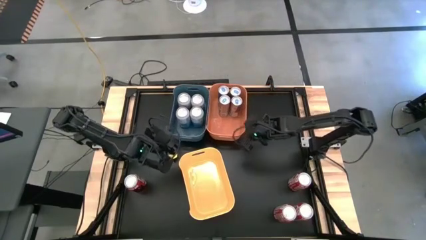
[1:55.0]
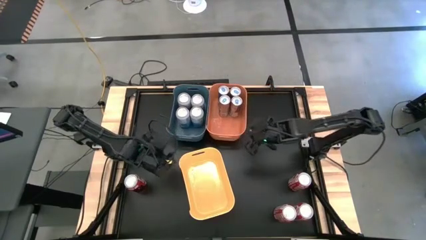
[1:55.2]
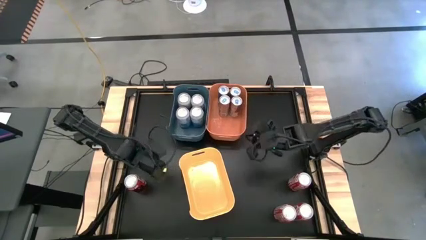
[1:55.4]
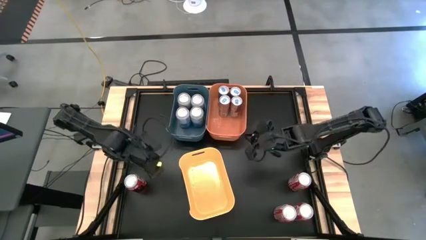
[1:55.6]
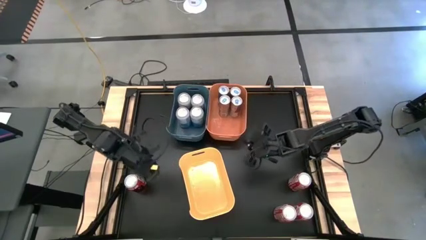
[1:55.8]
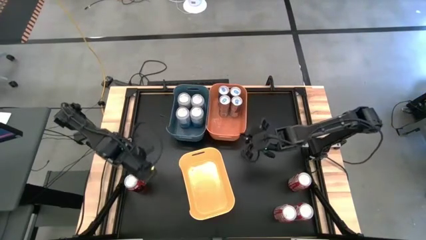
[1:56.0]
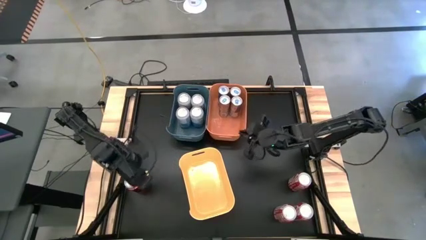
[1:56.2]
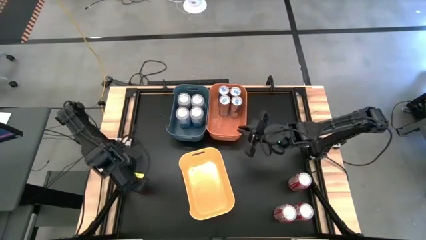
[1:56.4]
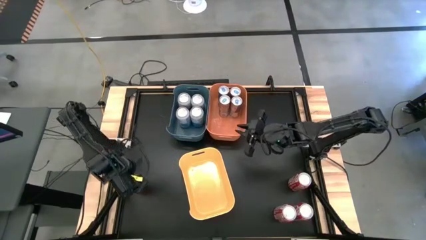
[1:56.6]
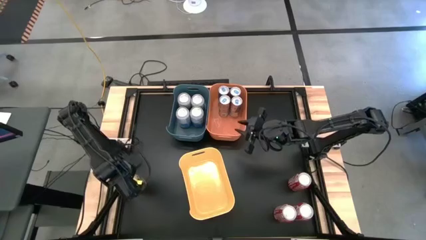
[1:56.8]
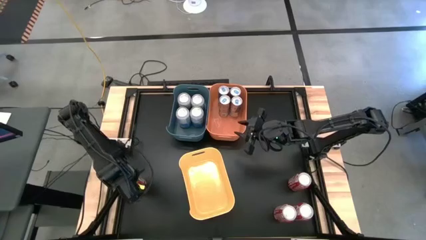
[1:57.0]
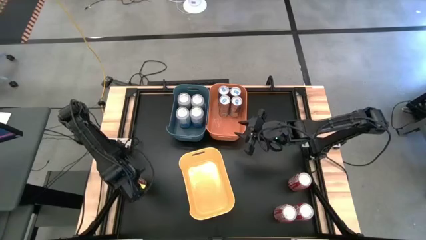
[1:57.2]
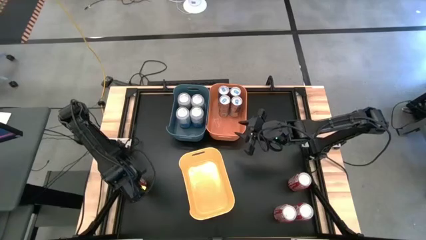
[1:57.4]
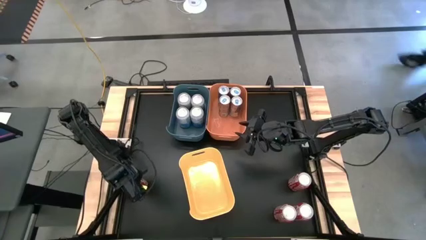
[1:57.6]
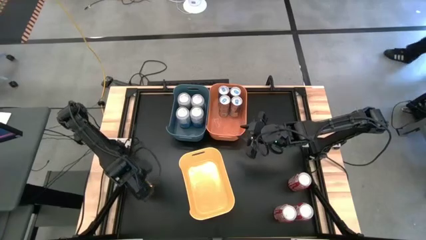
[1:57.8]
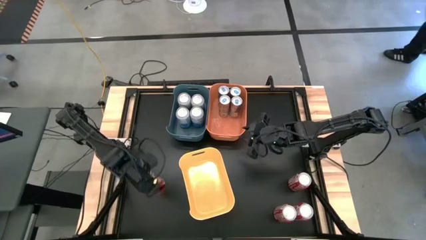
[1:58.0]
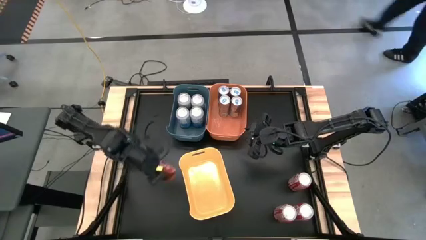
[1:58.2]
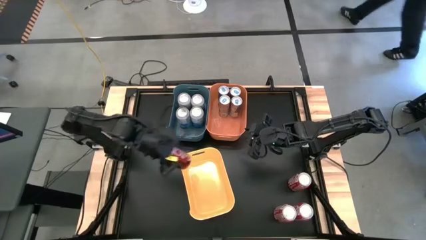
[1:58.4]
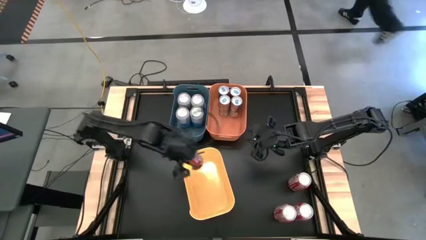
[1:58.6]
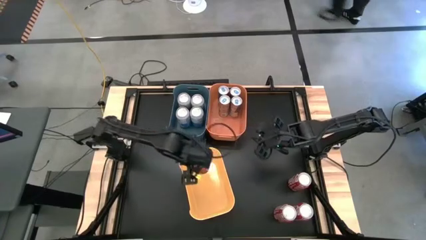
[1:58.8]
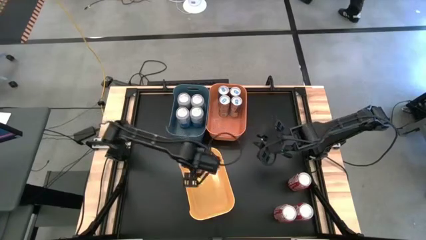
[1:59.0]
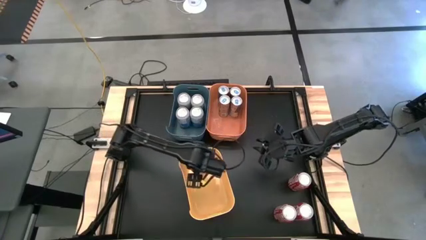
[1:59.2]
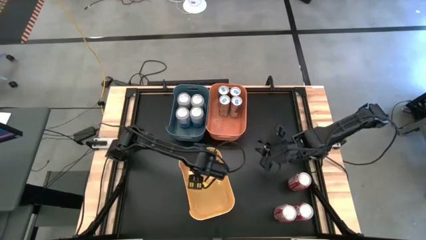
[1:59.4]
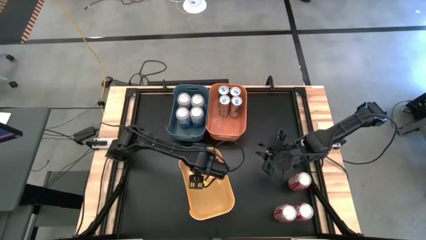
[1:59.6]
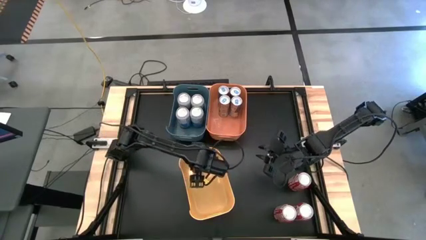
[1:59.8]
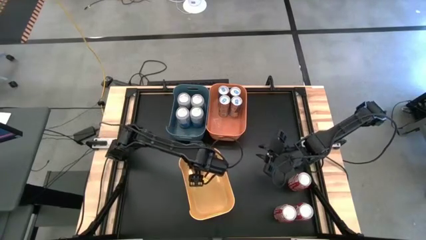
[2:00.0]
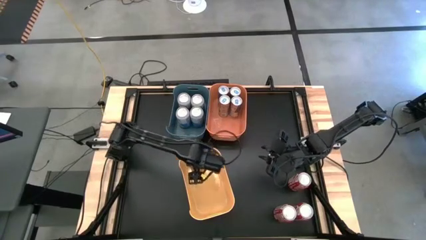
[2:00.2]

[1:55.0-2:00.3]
Task: Sort soda cans
Put the top left red-white soda can into the yellow bin

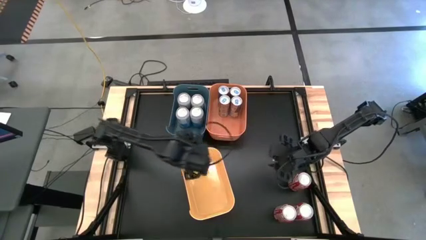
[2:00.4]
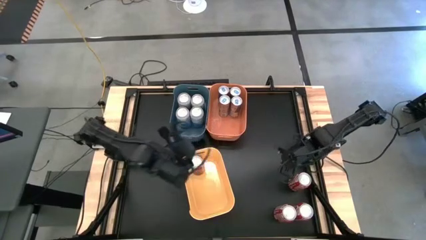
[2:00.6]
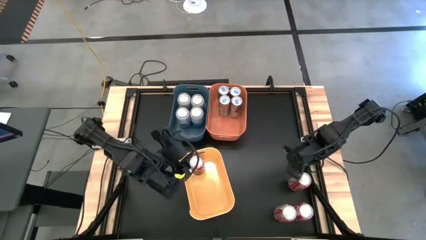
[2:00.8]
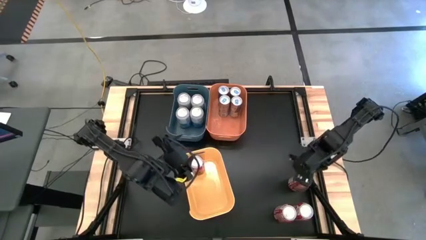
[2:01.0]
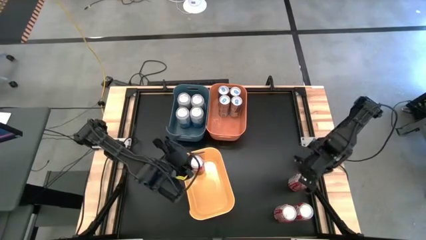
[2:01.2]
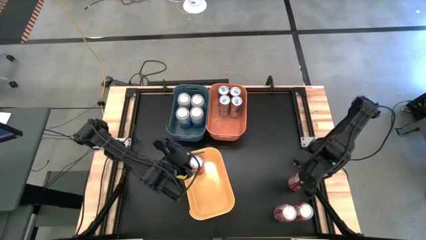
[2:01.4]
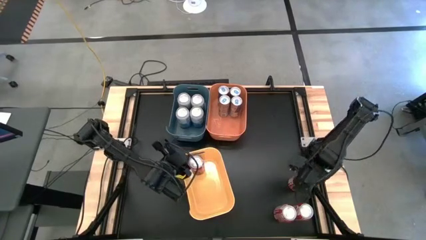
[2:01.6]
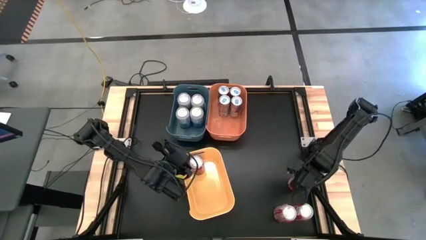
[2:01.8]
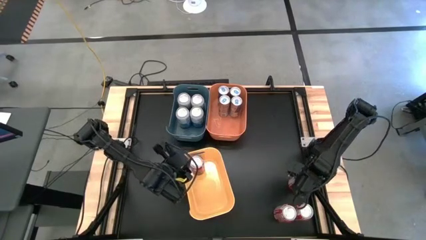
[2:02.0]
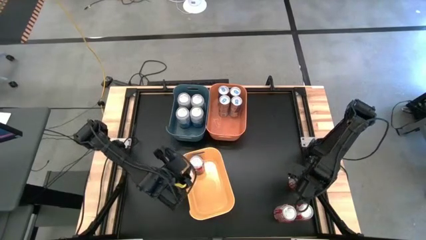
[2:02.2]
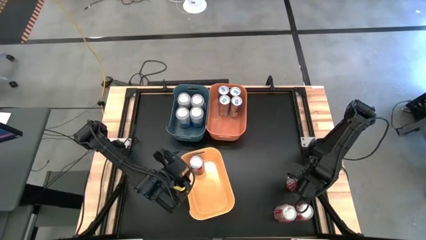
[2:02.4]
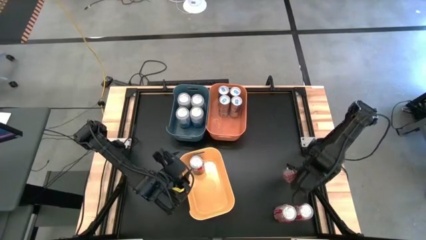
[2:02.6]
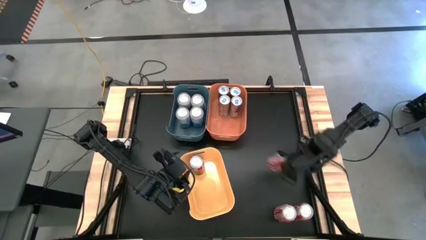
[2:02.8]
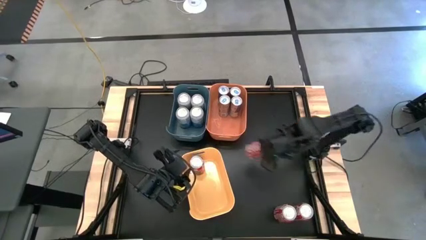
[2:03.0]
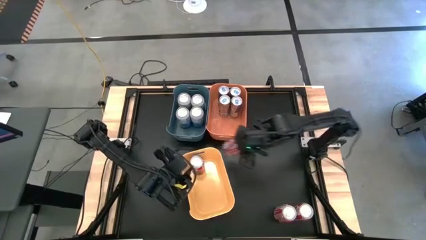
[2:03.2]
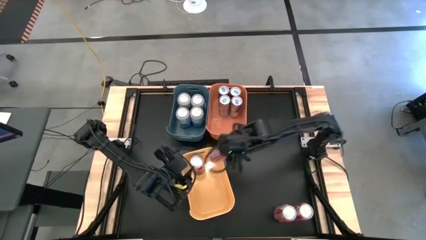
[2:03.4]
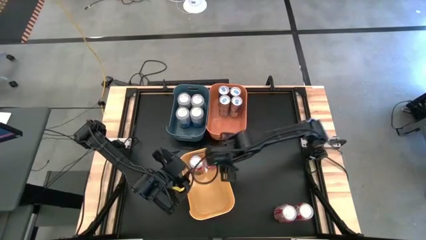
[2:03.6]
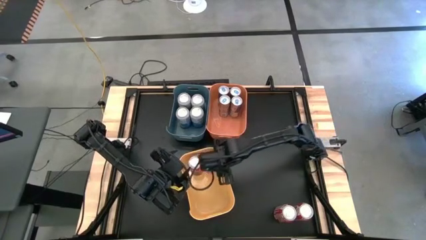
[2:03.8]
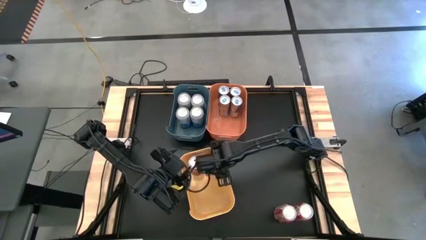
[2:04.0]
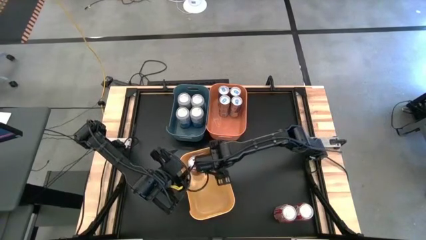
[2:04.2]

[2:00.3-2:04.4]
Put the top red-white soda can into the yellow bin

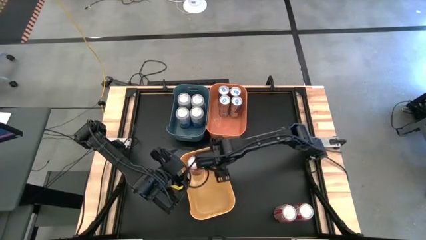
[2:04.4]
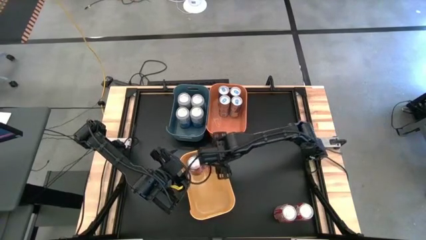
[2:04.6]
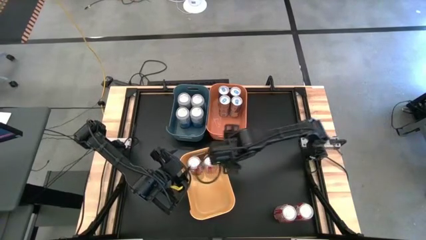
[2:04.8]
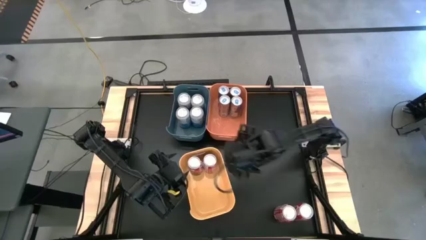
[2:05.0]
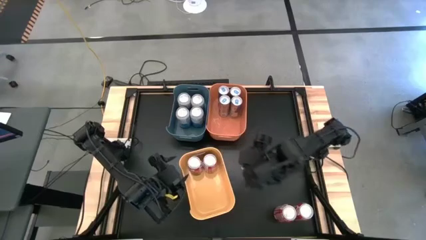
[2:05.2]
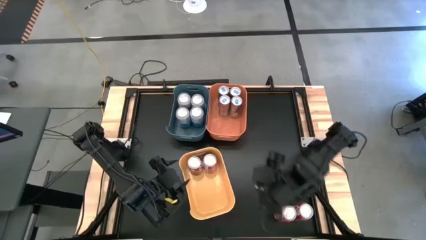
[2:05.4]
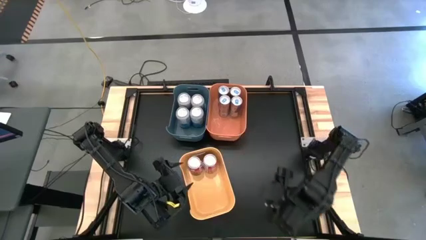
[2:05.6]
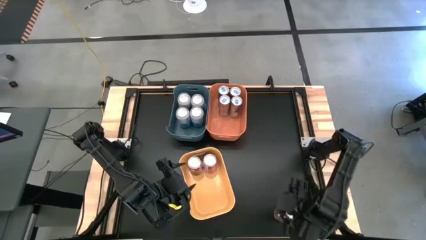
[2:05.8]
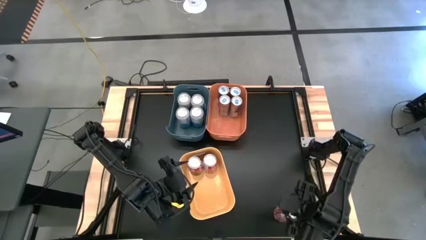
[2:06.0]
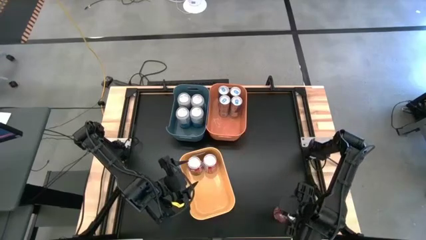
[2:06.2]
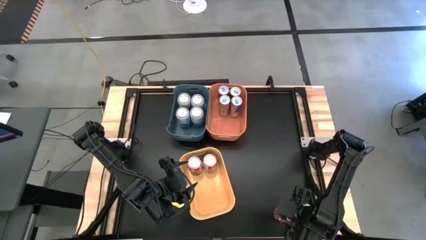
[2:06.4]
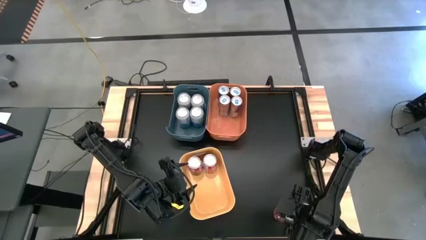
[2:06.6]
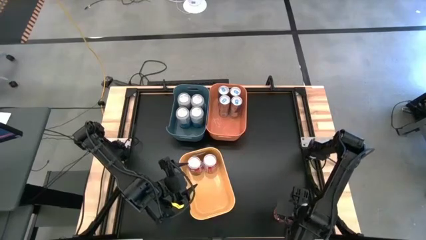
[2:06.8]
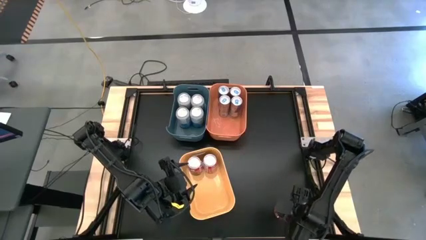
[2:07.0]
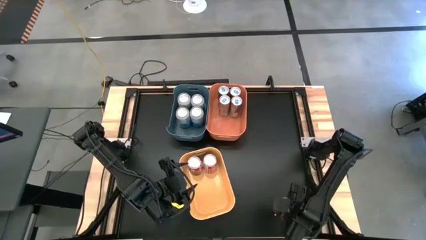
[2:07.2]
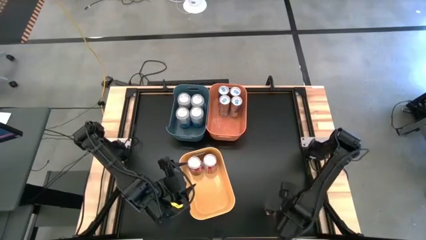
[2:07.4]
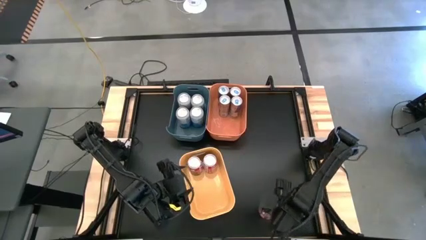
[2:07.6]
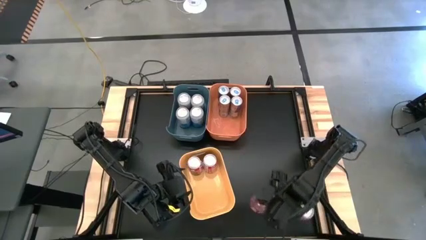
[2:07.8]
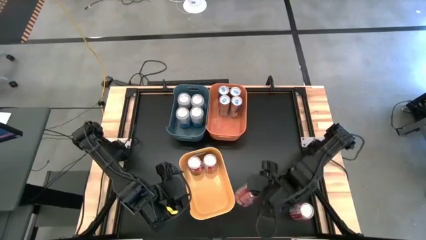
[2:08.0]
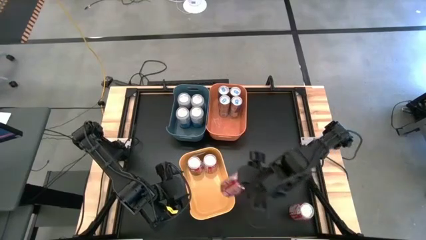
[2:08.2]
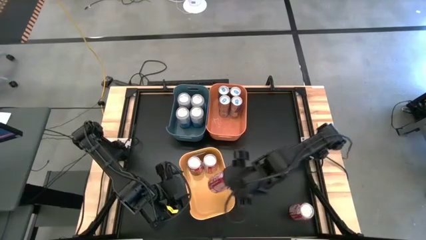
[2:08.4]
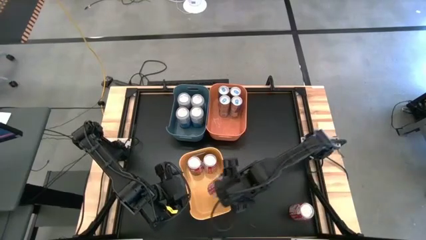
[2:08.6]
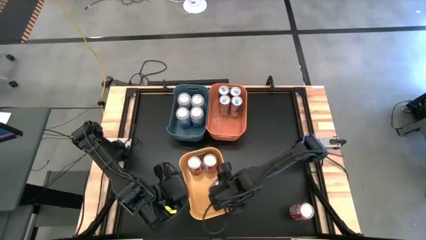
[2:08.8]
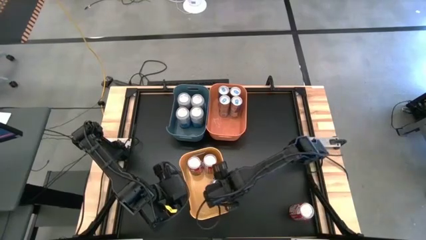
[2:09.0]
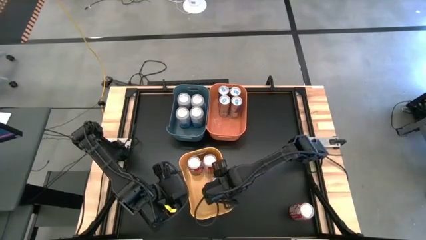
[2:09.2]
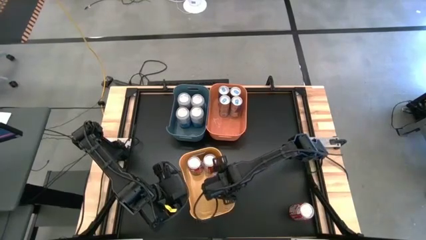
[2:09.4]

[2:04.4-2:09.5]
Put the left red-white soda can into the yellow bin
